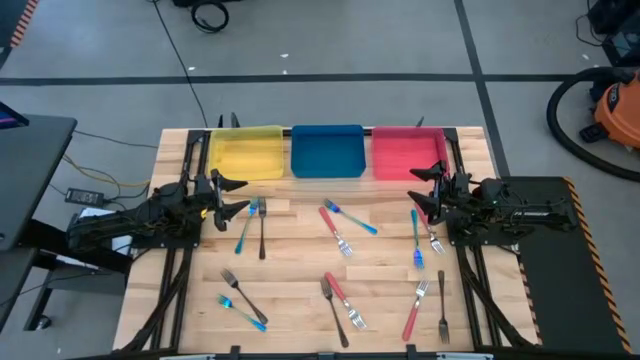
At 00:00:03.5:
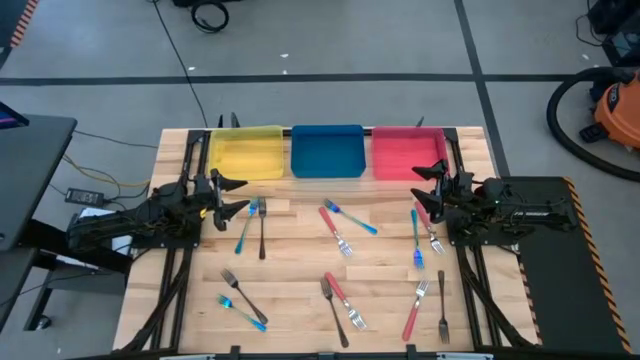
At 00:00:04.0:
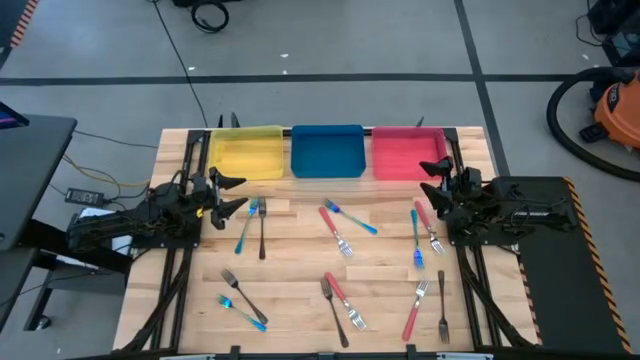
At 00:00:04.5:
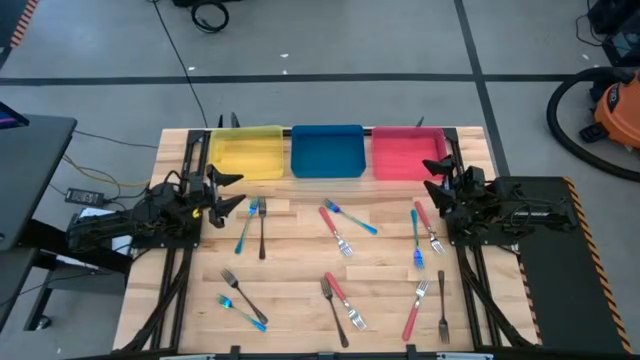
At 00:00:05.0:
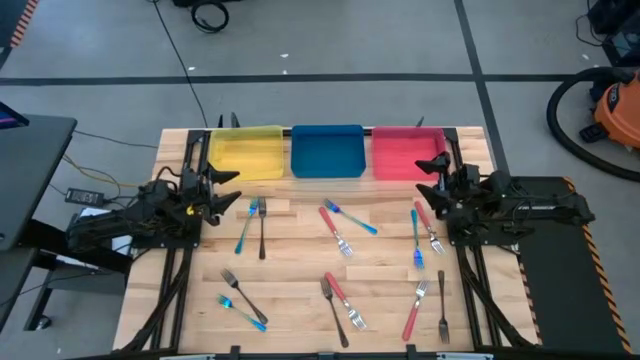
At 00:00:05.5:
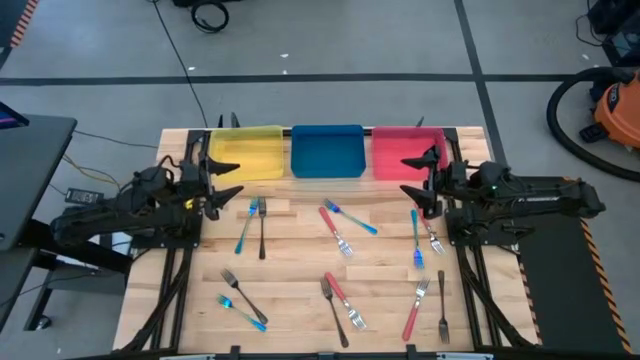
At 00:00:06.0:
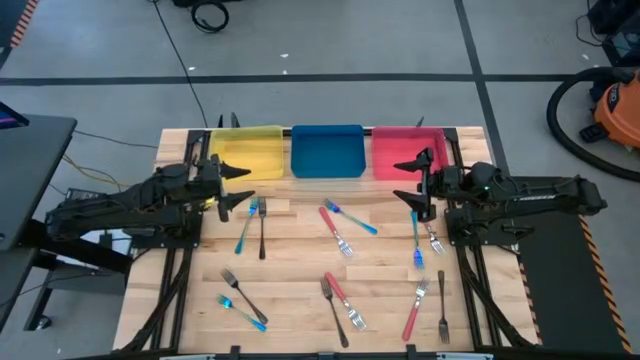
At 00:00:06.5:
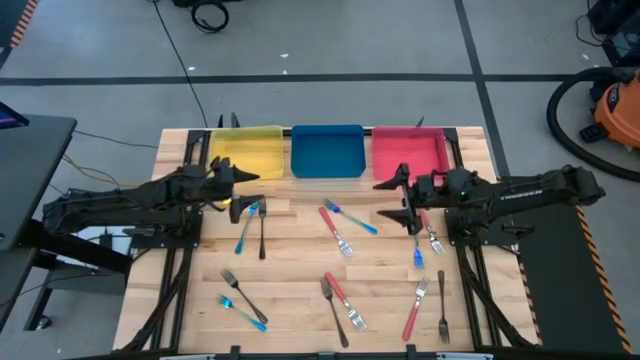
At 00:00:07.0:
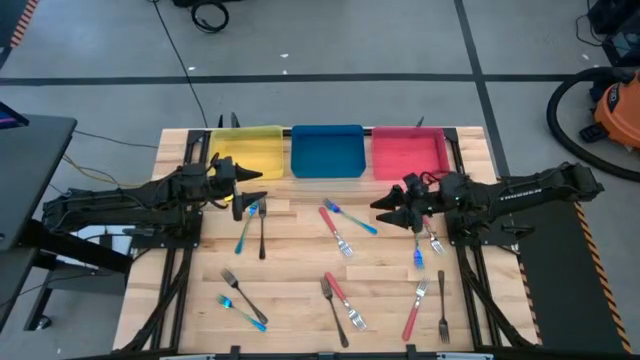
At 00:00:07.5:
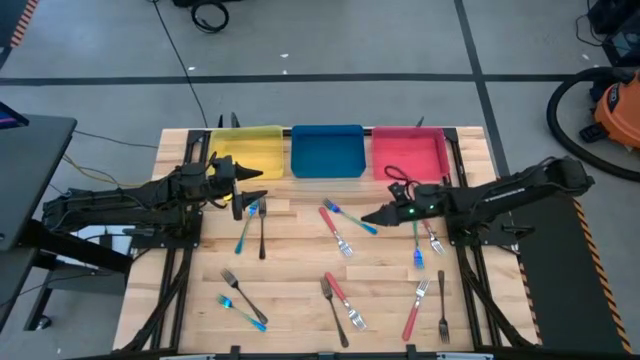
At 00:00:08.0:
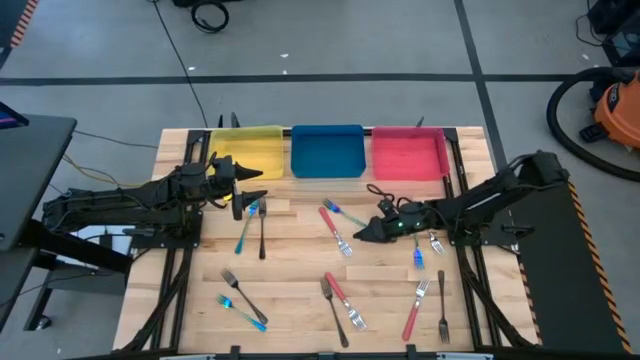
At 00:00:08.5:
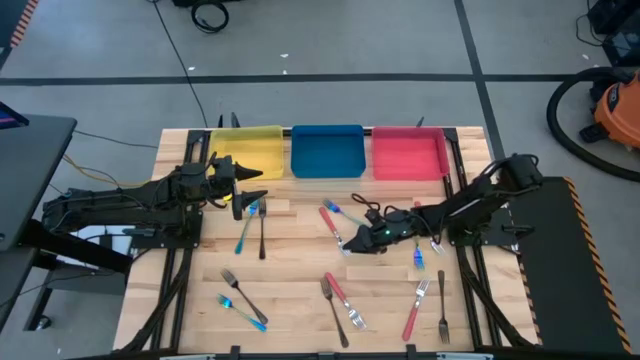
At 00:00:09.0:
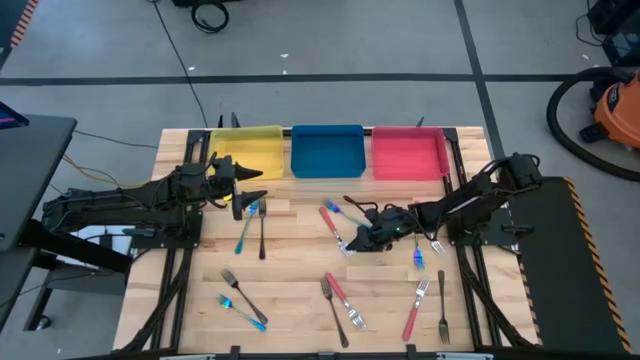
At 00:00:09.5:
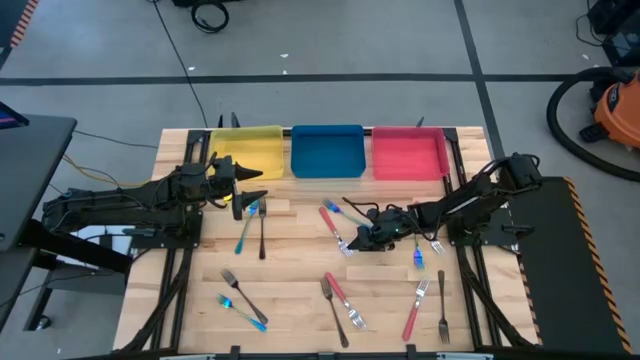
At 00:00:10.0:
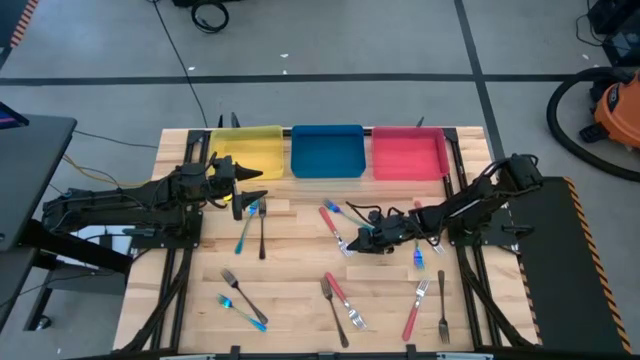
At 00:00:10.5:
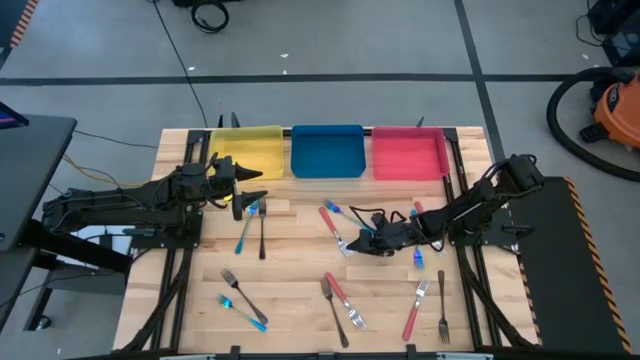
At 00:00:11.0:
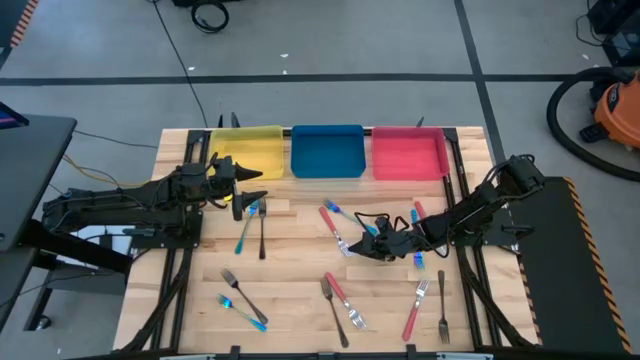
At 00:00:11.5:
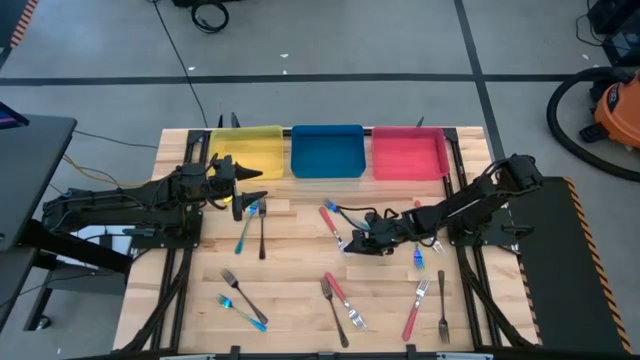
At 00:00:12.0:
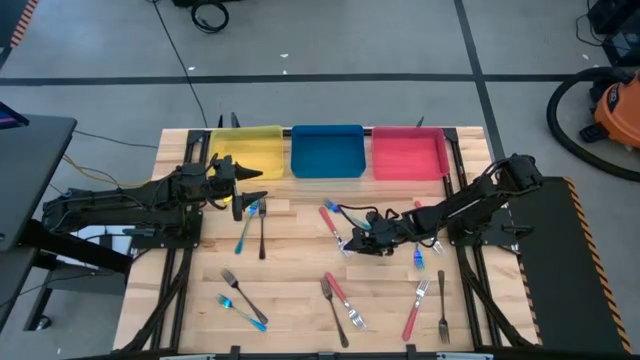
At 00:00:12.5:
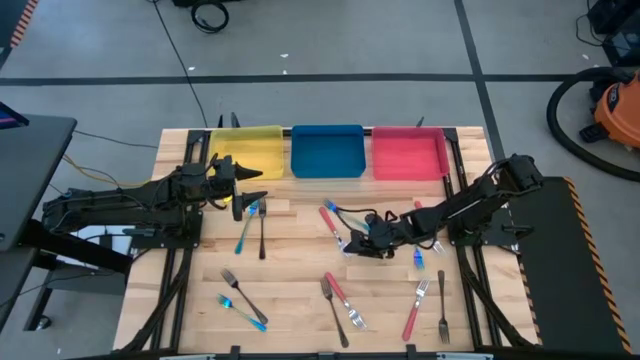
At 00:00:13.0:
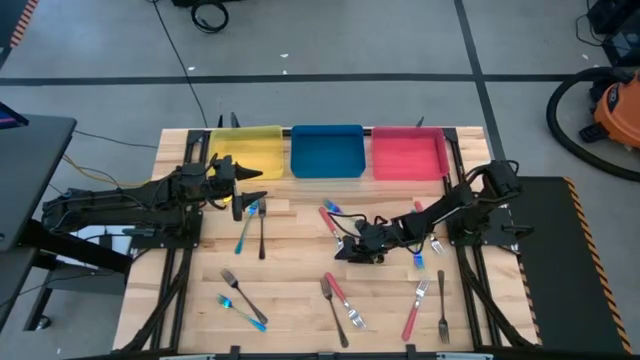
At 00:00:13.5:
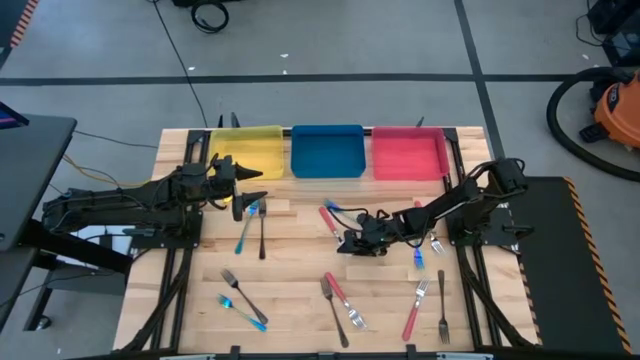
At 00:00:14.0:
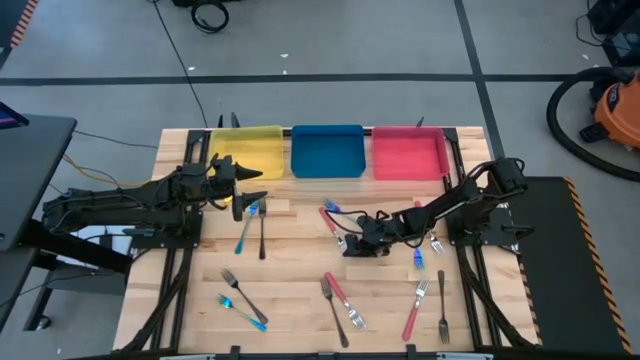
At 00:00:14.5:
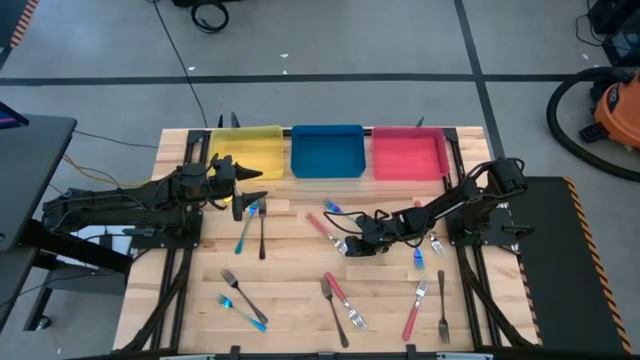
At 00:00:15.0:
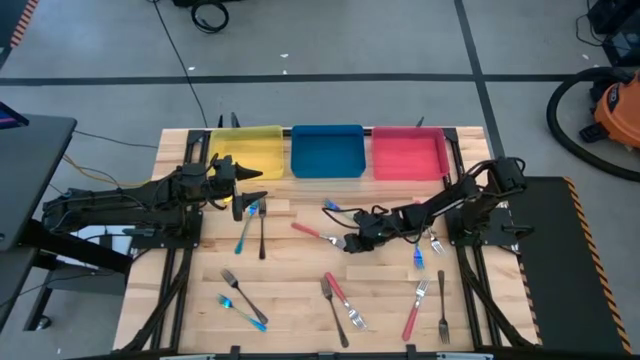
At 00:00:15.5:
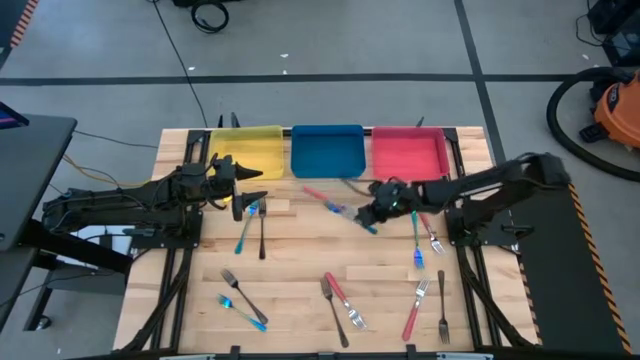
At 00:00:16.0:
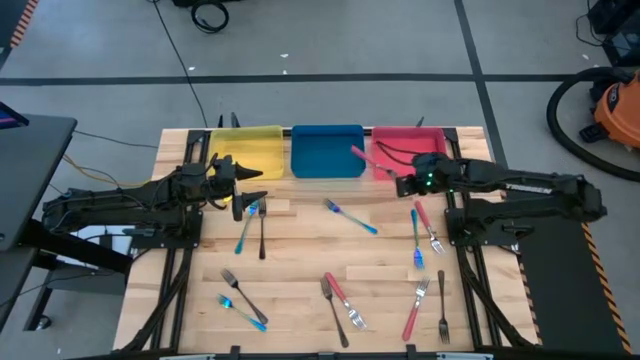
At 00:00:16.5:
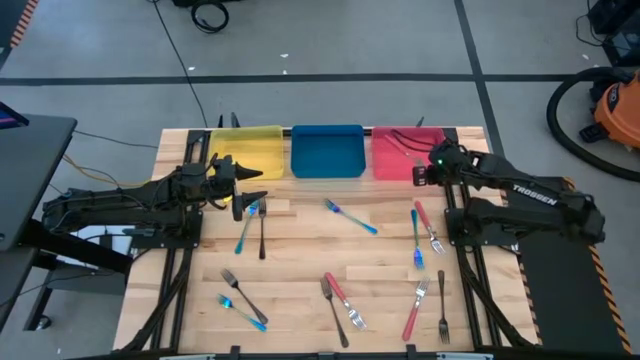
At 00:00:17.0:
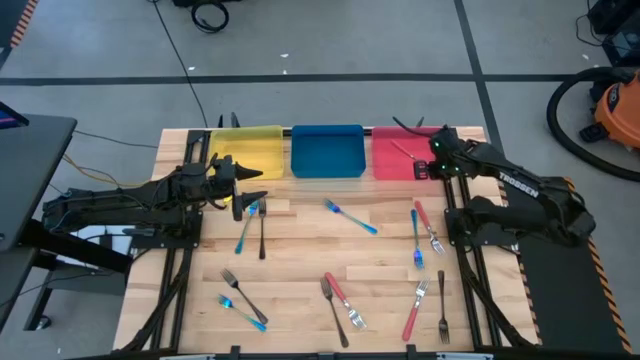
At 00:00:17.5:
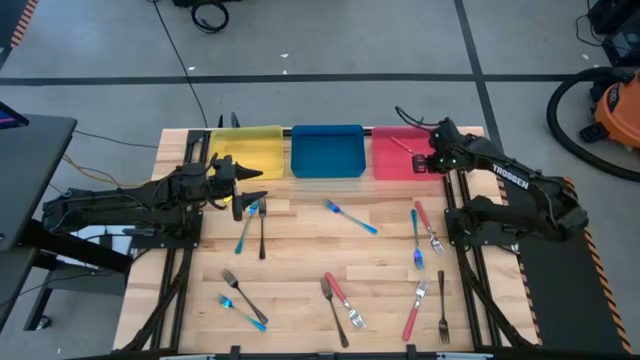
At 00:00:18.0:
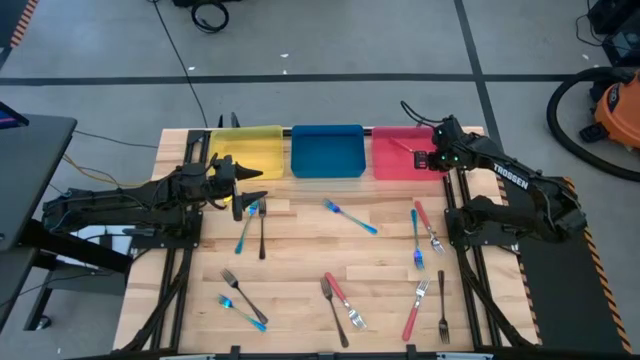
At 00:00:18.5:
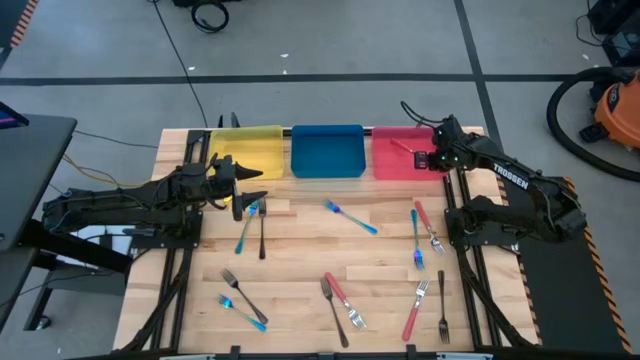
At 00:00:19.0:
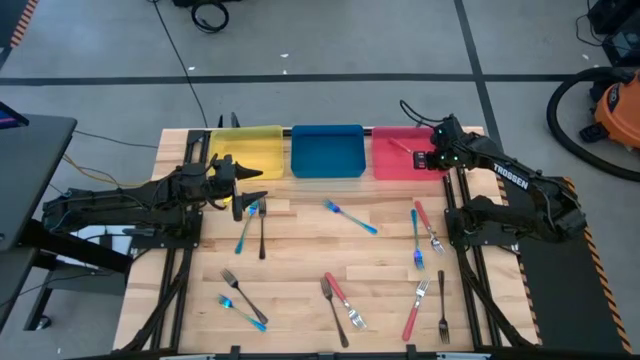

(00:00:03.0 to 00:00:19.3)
Task: Sort silverware by color (type)
Put the top left pink fork into the red bin
